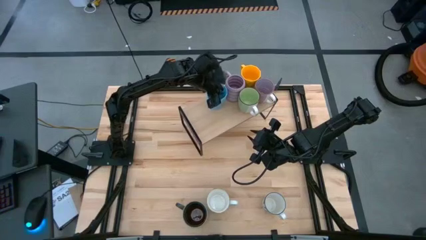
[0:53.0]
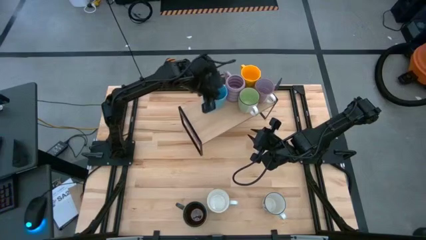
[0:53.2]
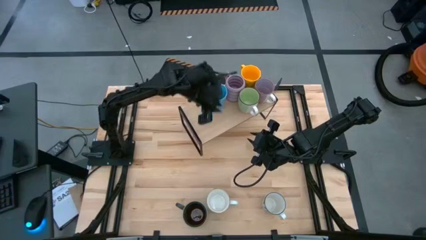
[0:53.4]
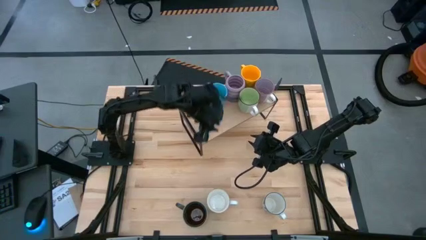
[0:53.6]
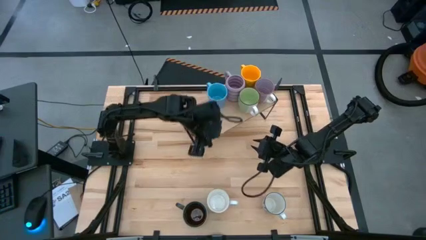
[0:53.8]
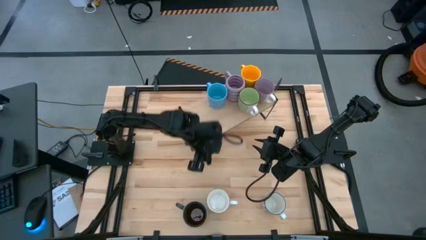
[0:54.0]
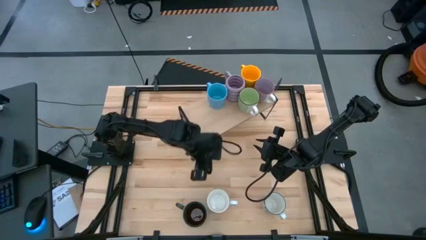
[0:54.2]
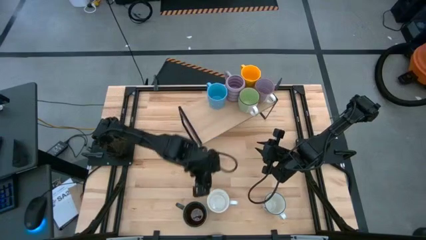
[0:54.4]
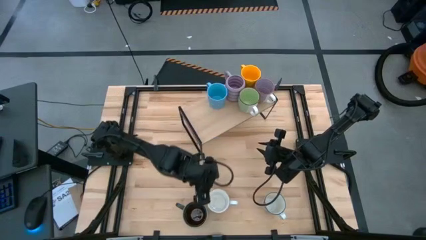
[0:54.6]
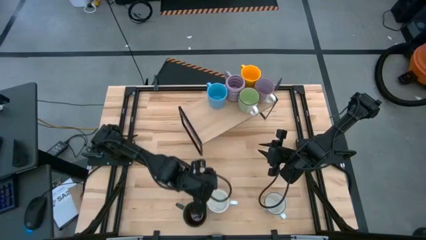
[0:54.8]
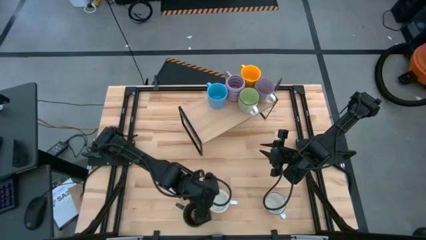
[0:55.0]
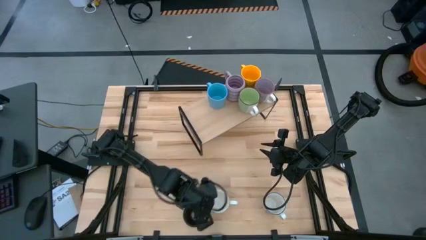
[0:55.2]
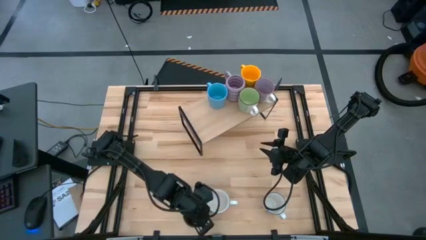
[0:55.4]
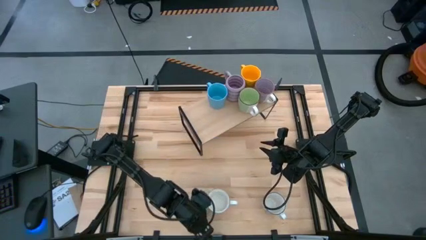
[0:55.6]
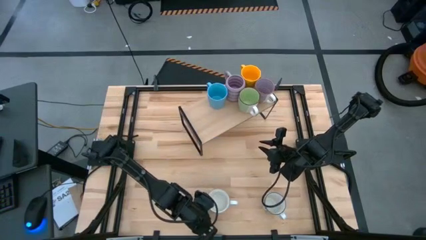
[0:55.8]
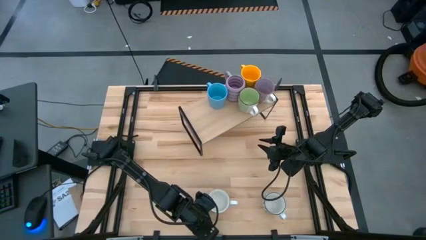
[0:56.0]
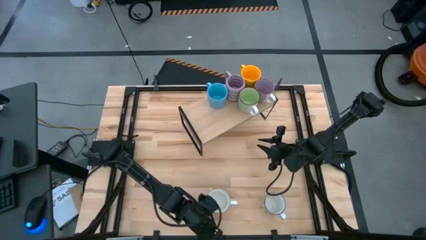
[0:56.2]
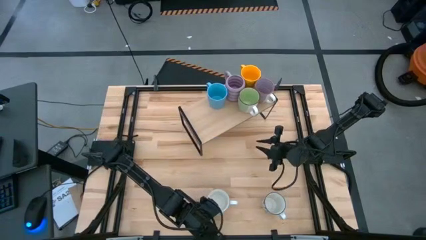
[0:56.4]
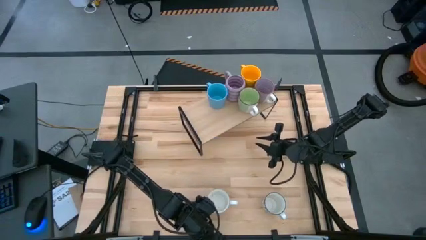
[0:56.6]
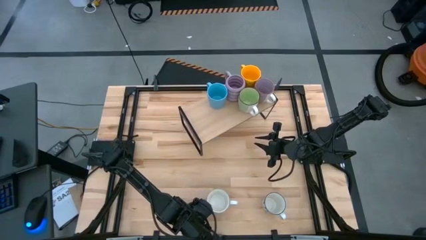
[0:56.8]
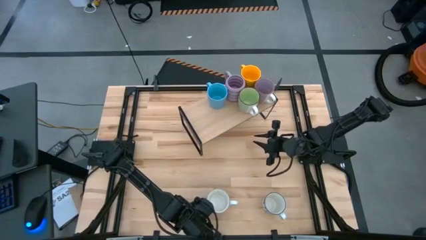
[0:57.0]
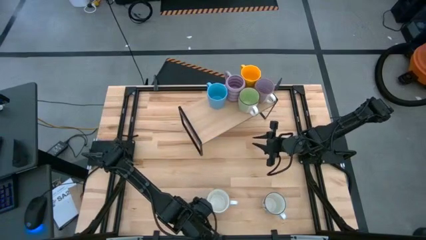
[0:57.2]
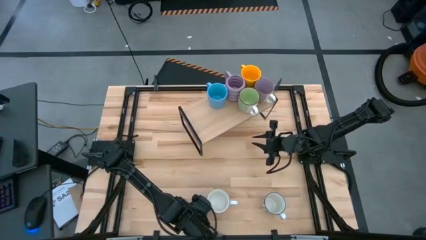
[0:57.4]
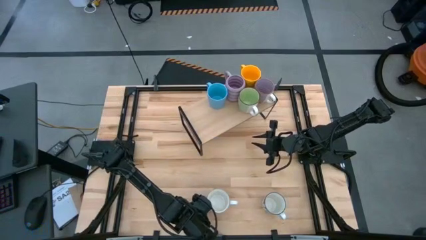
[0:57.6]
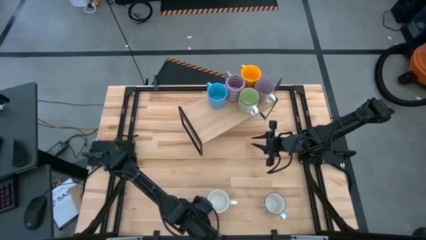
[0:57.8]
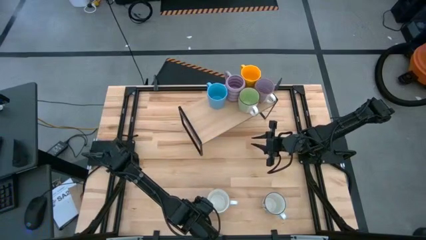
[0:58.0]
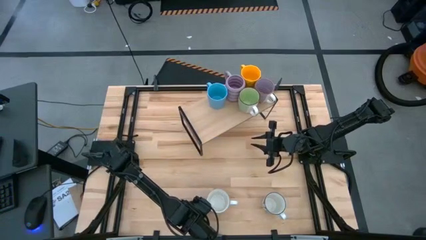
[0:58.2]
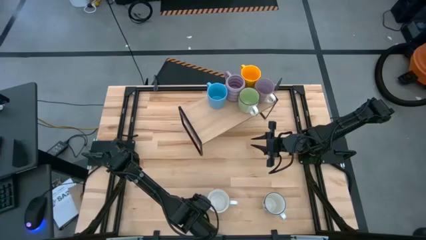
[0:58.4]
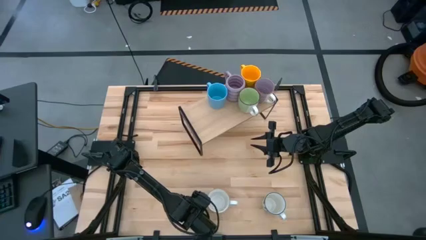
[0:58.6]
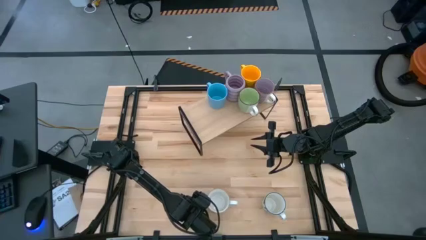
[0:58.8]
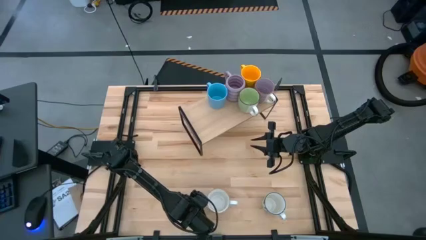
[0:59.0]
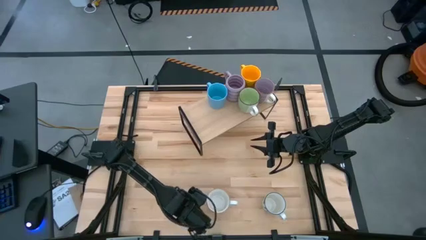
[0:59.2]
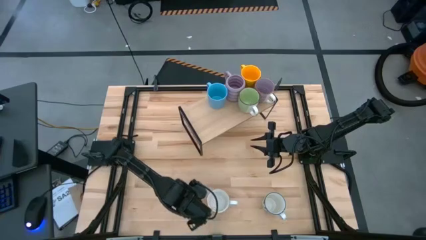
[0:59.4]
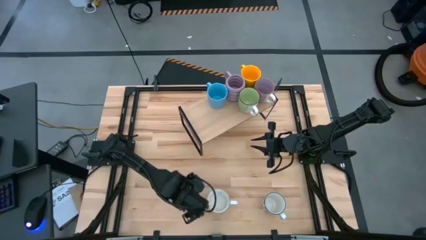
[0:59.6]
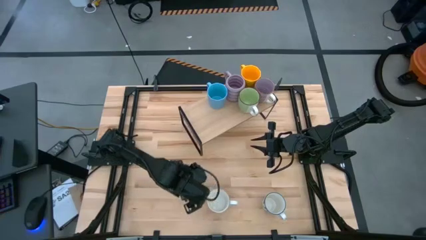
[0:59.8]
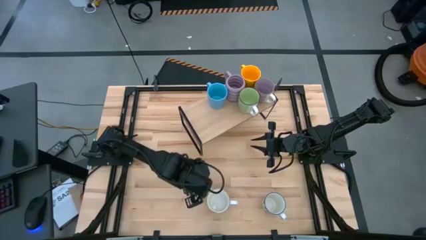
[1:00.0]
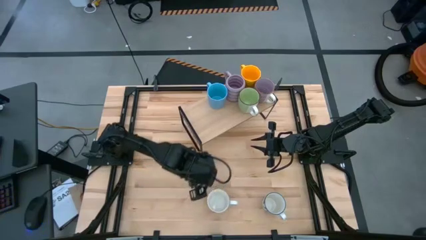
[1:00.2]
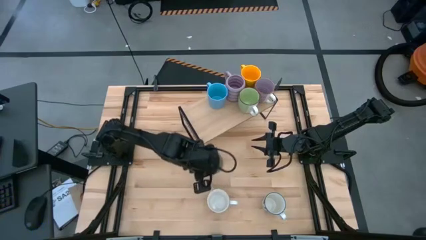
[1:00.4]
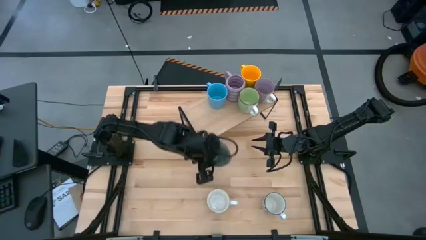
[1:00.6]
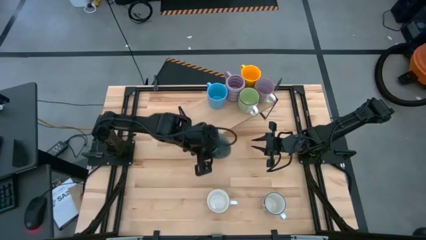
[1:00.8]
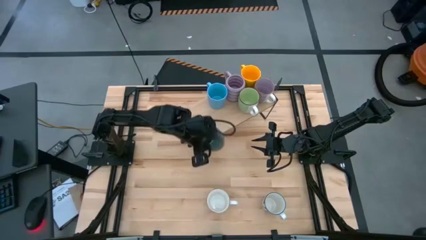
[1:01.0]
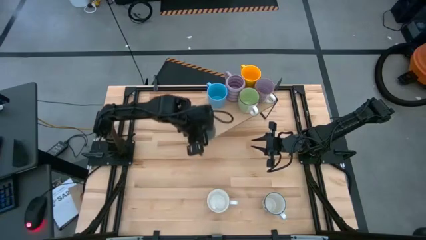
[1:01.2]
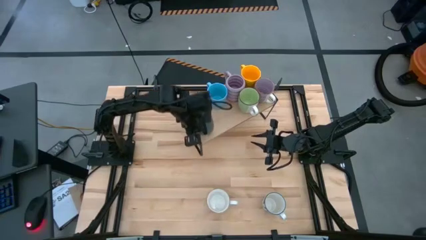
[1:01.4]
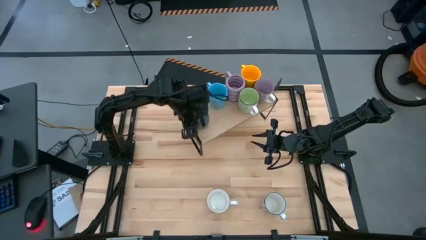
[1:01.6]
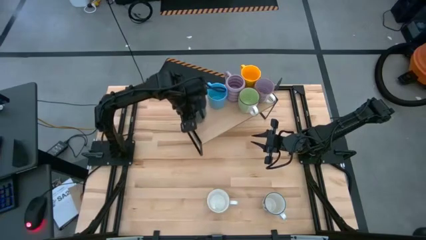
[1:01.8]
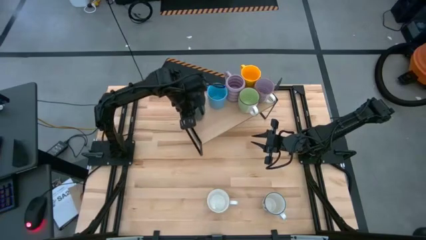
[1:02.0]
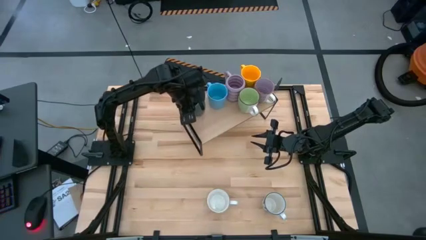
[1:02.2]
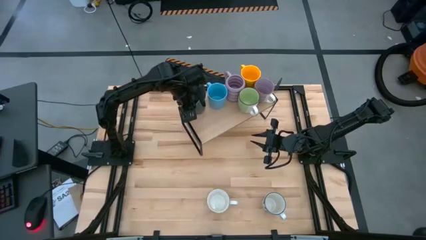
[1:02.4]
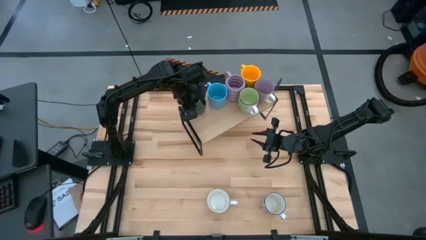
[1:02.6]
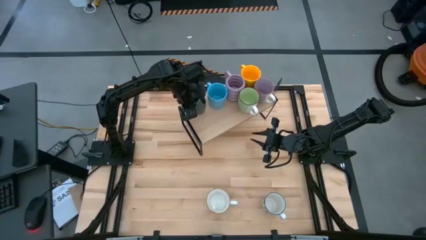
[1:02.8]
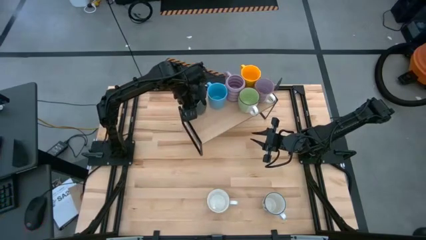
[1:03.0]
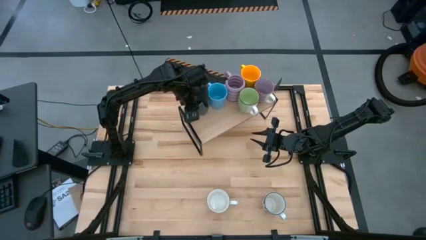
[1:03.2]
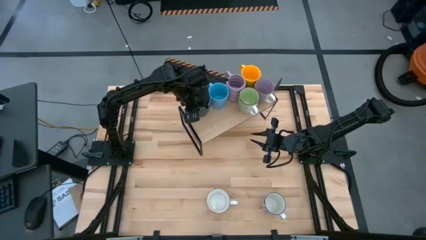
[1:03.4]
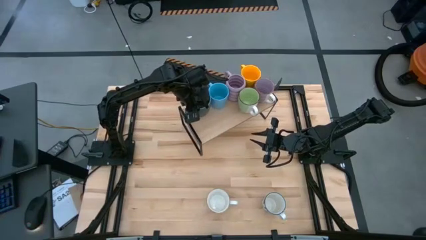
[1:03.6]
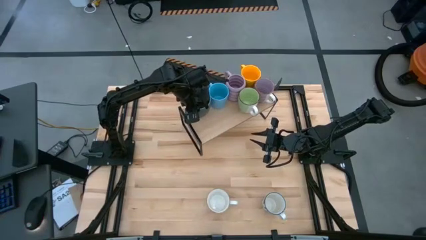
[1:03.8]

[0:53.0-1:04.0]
Task: Place coffee mugs
Put the dark blue mug on the shelf

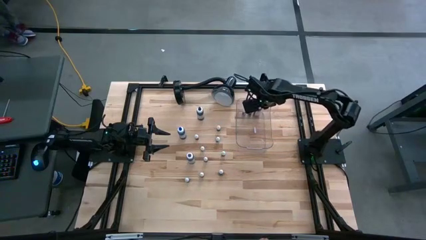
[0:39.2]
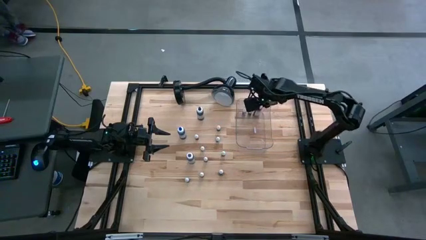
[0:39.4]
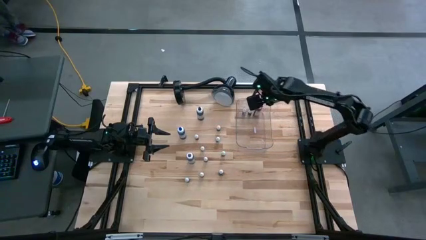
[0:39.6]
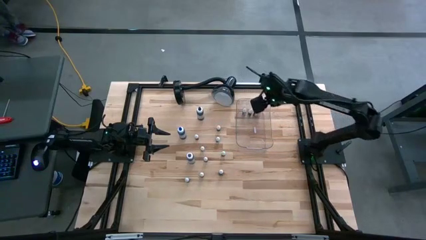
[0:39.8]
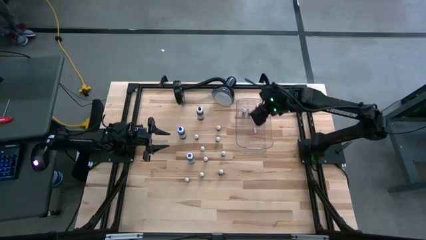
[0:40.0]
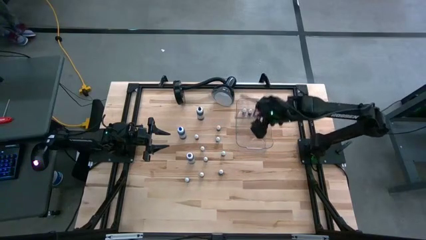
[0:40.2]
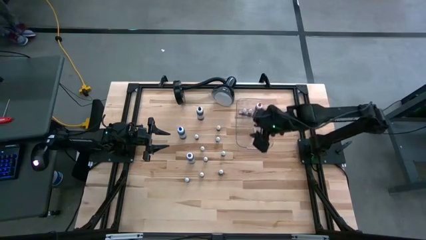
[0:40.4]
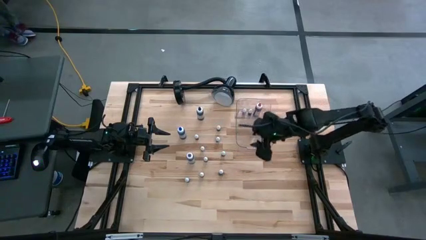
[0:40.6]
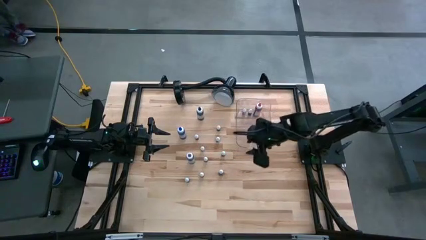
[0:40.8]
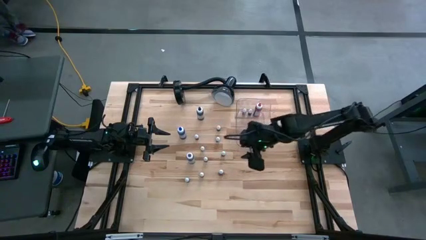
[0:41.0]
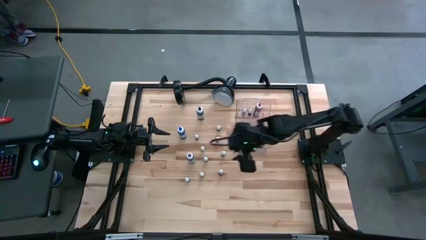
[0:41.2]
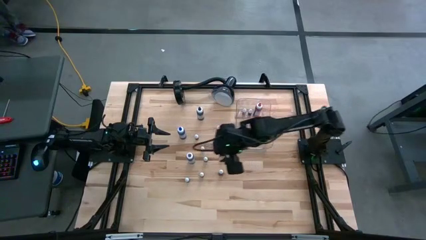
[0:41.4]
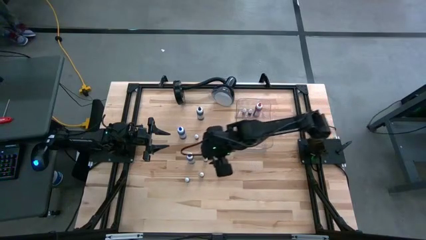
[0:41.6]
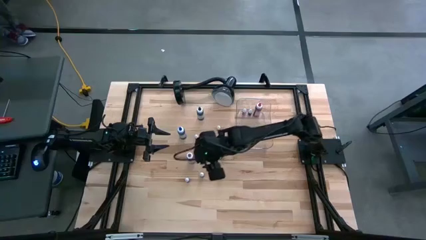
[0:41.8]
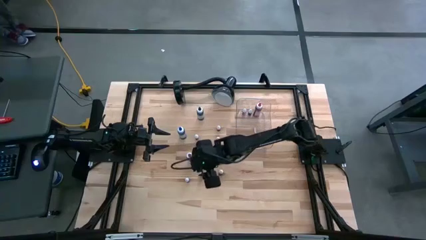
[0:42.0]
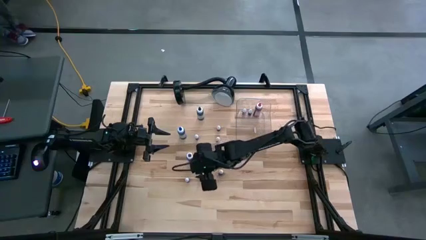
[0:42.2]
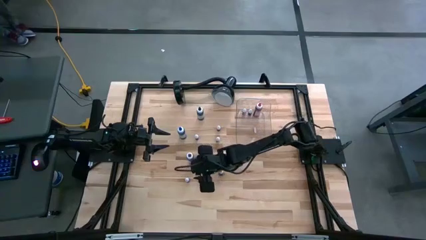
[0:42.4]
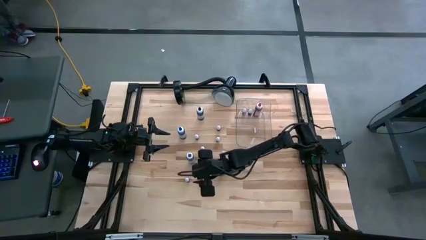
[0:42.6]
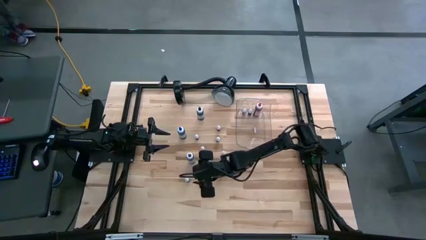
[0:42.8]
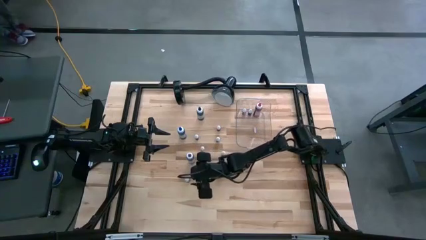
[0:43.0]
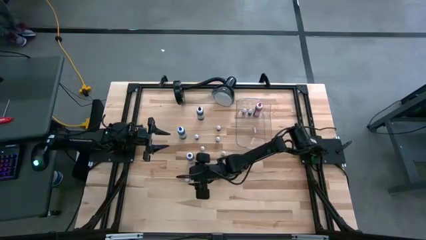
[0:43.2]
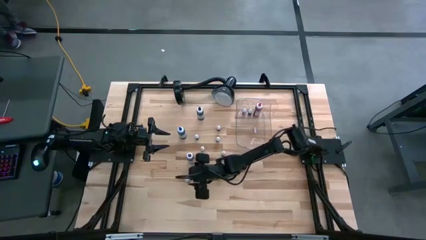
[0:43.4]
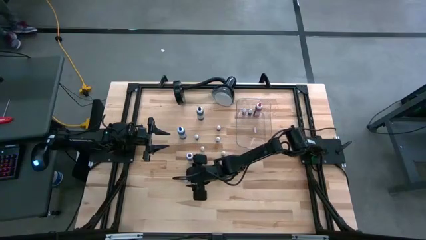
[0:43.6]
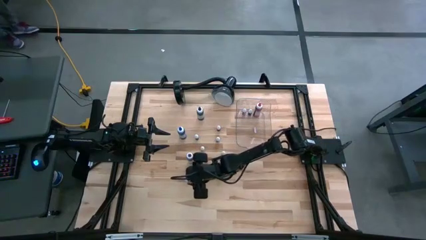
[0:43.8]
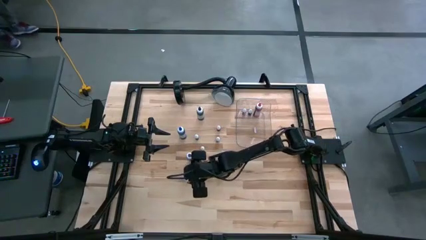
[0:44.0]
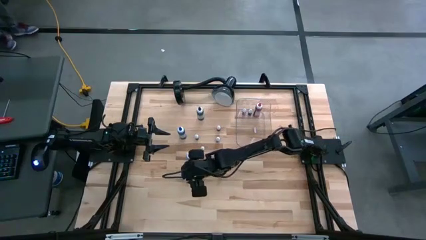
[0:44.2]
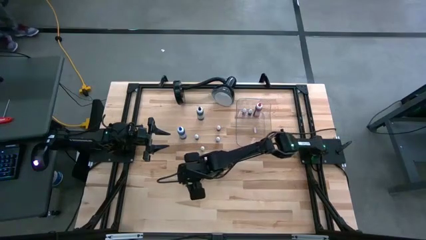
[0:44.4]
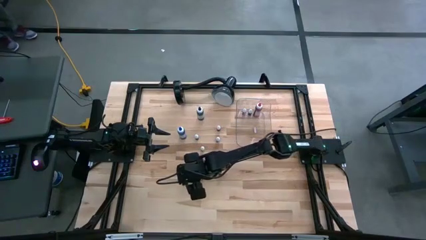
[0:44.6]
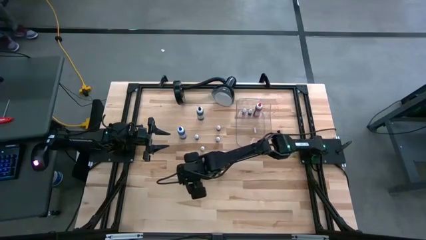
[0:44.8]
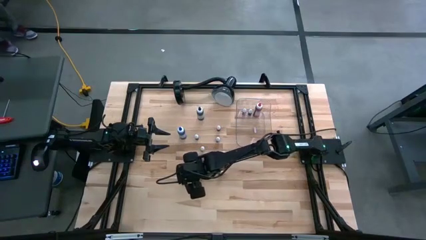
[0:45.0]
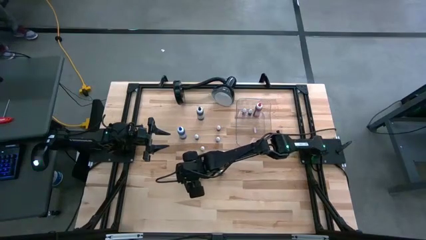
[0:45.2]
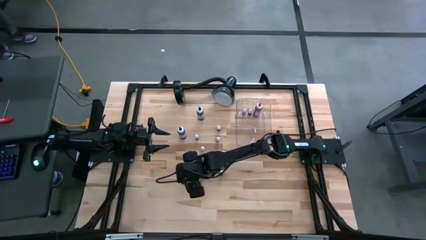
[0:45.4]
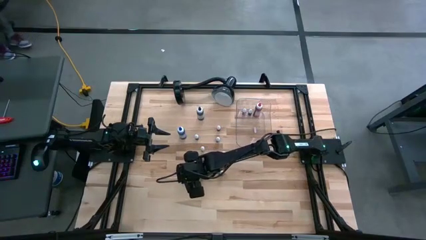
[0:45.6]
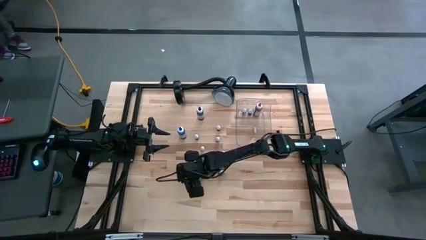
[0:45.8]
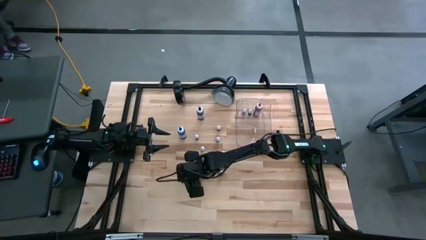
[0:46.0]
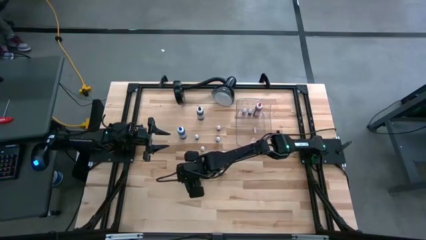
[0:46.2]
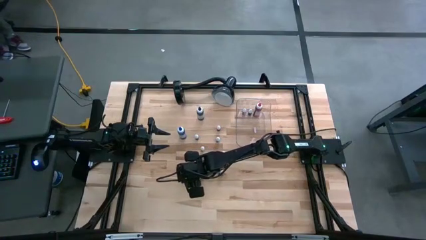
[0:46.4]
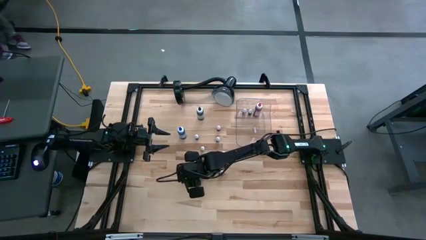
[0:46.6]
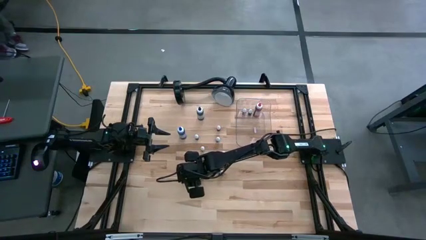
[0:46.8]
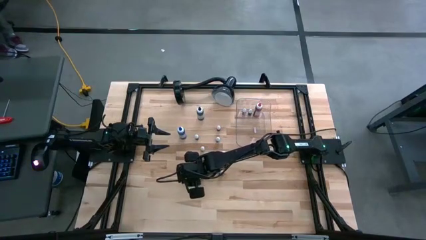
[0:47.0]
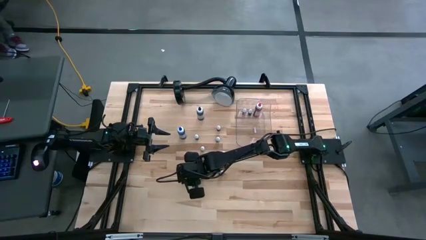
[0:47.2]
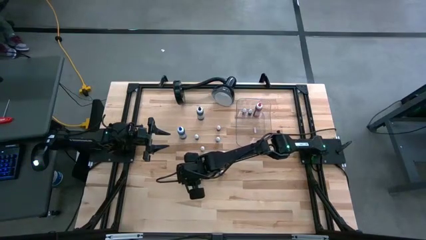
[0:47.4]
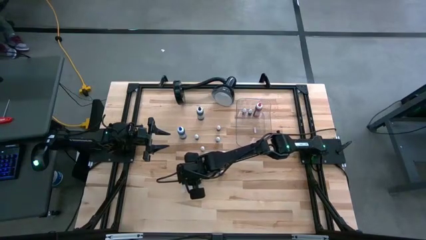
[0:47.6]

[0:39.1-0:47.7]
Task: Pick & Place food coloring
Put the small blue food coloring bottle into the transparent bin
